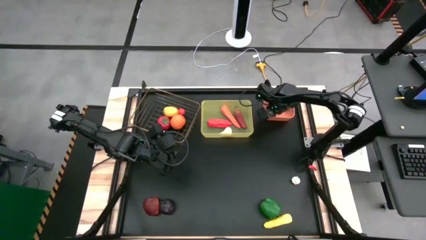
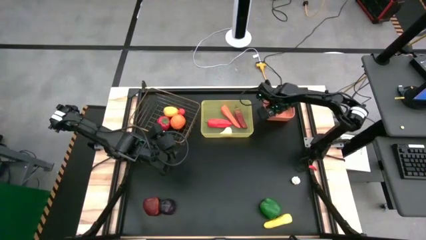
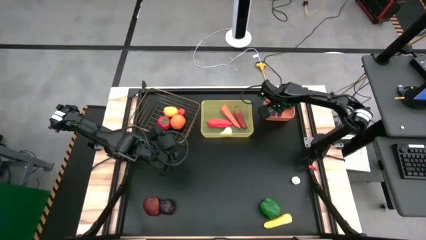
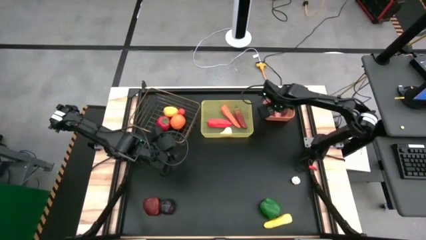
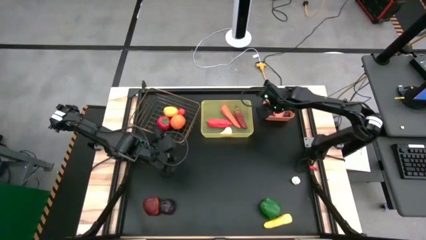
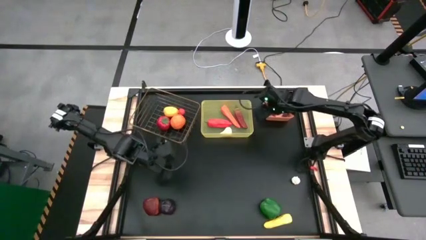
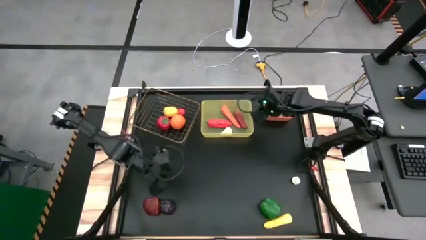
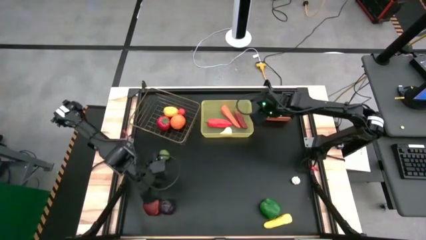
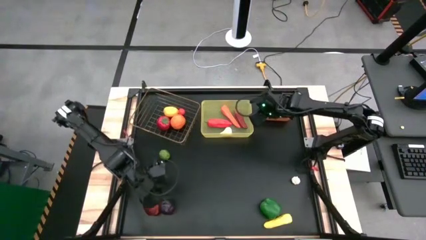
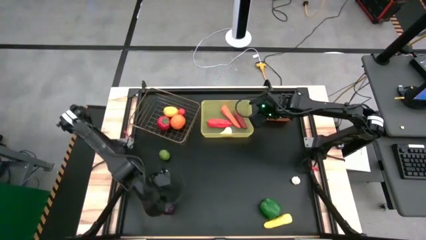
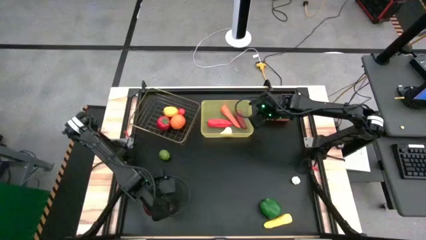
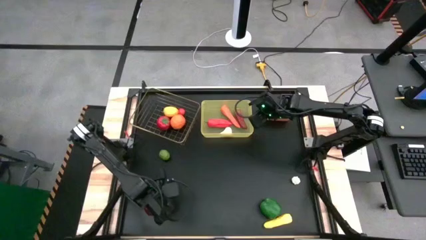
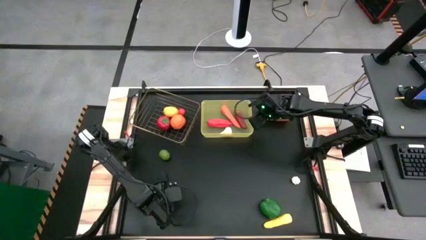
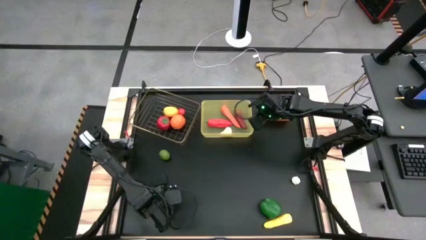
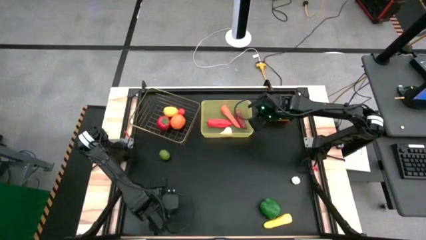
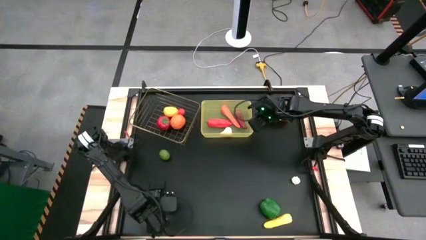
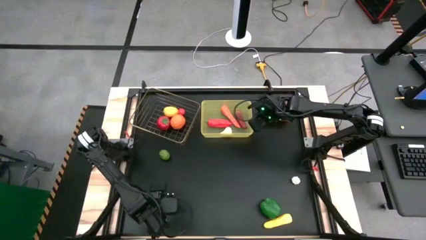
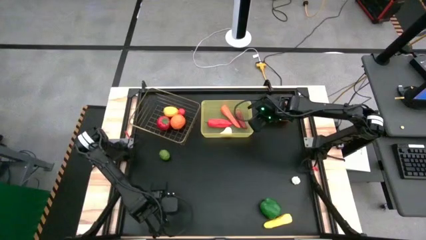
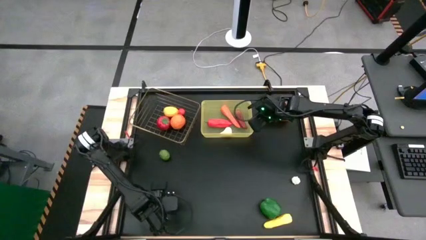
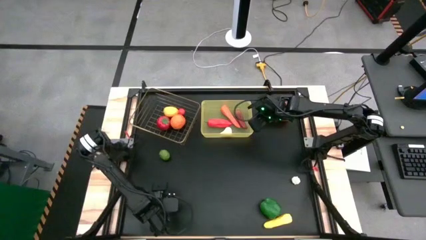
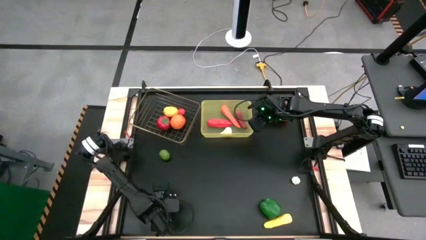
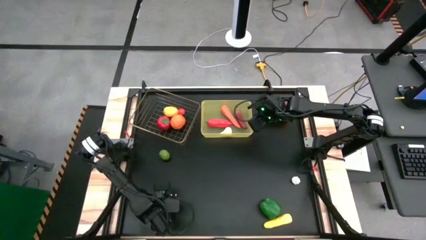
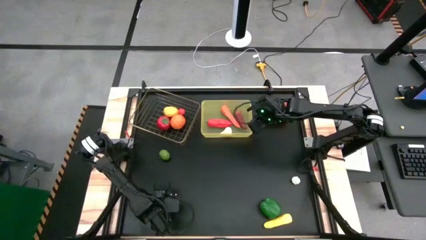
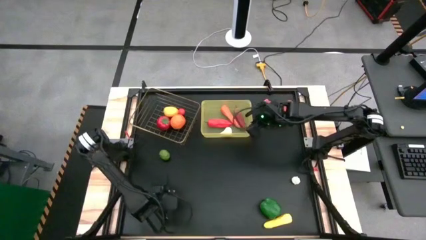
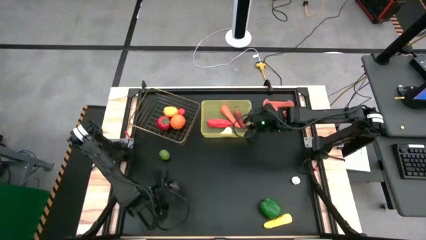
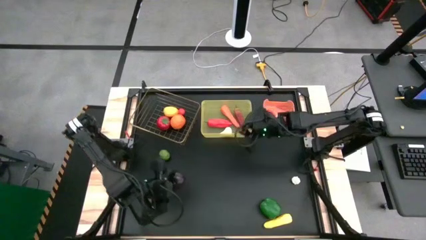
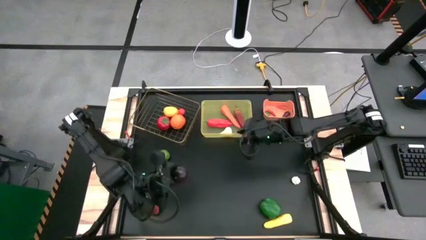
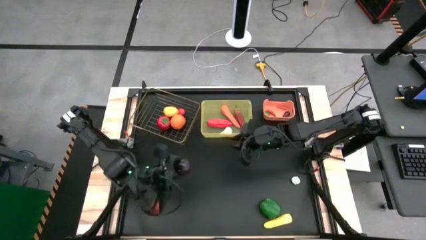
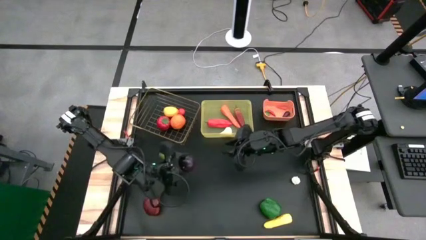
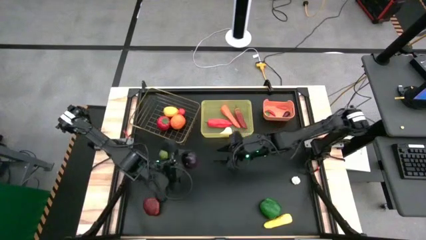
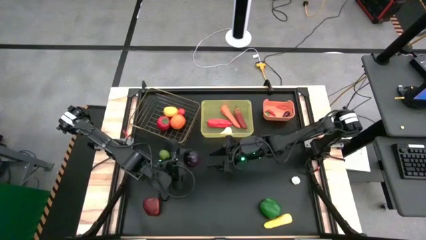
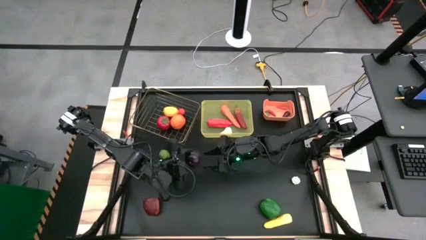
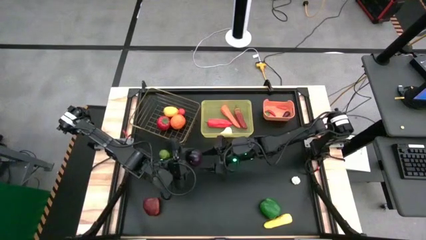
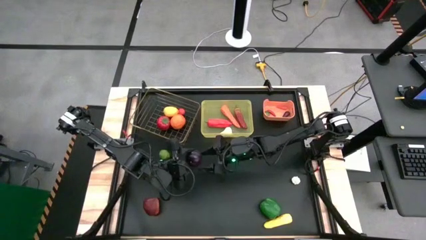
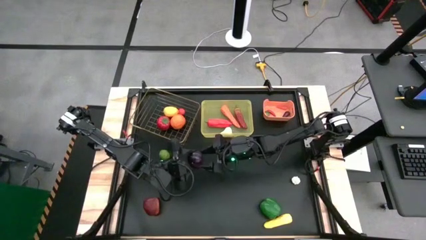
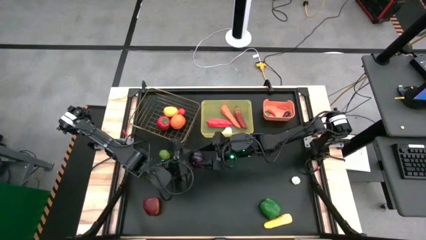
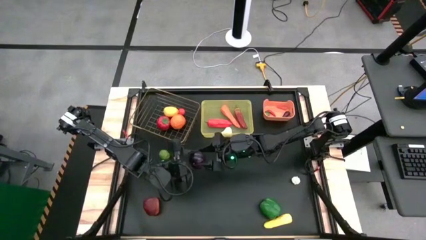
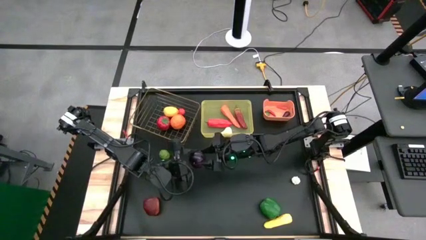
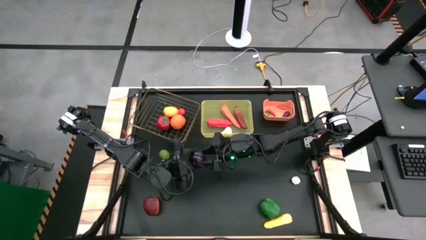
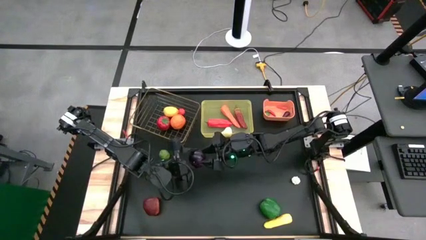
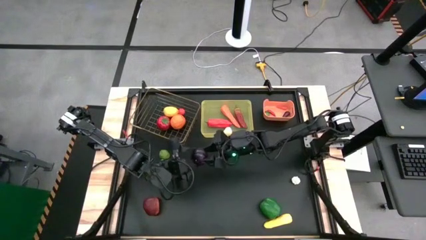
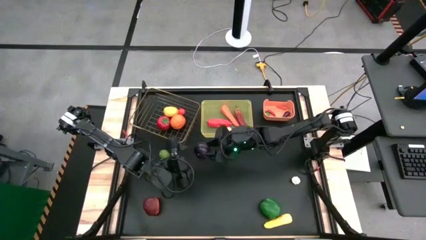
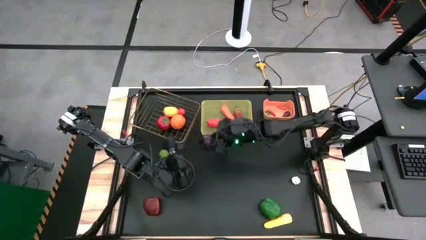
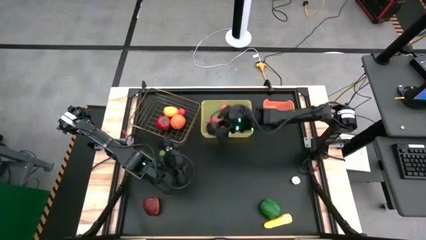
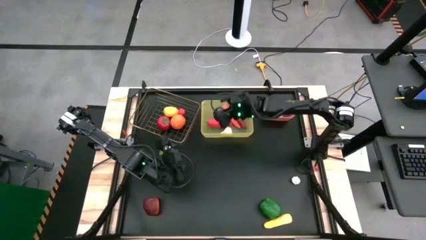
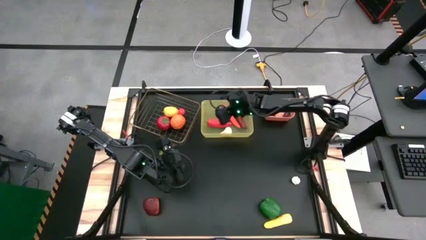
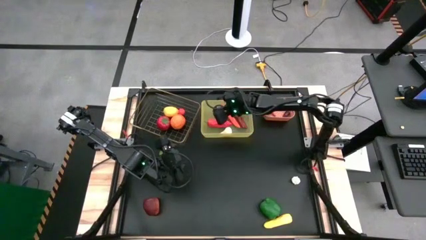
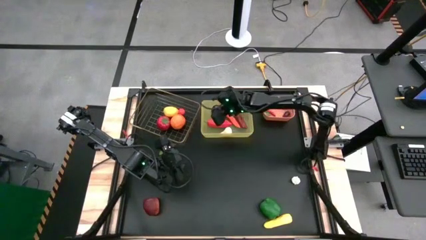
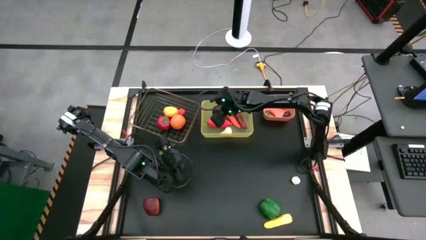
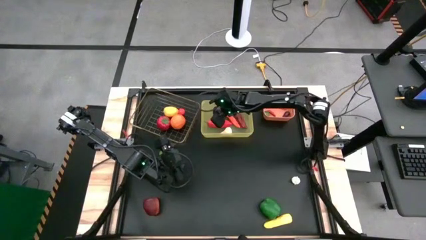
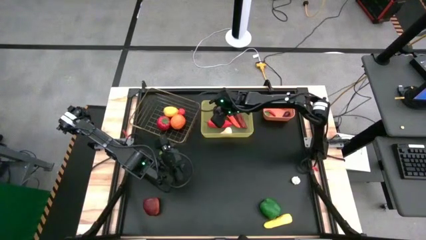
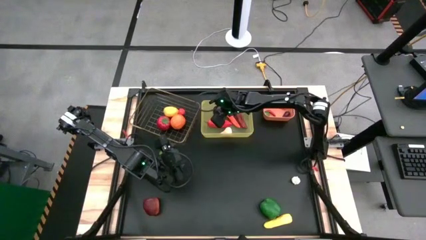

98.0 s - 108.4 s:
Task: Sort produce into baskets
Put the plum into the yellow bin

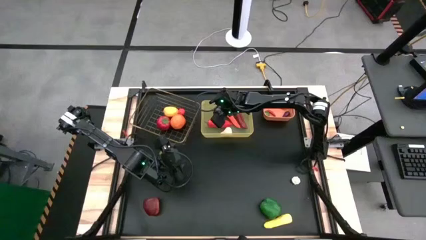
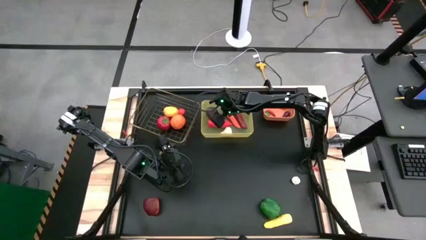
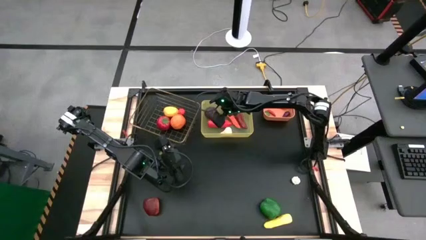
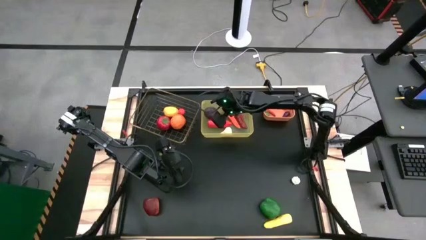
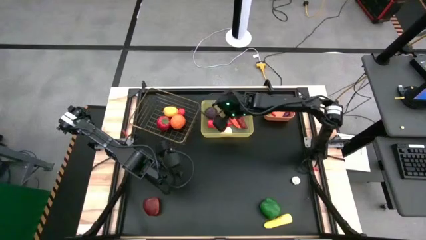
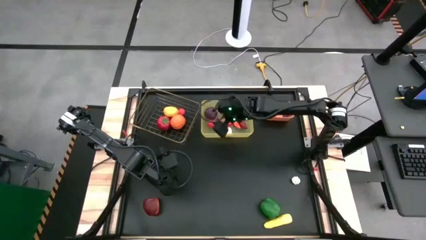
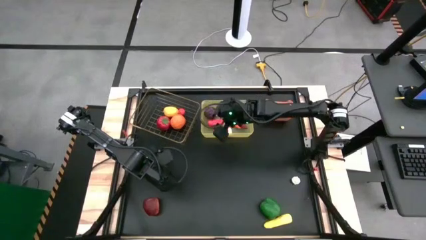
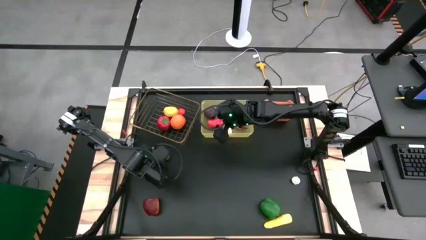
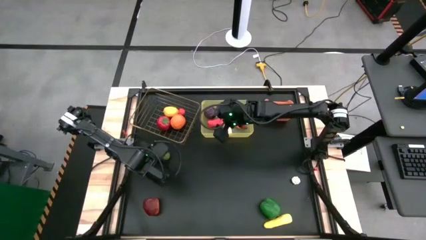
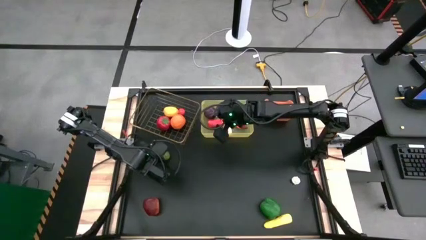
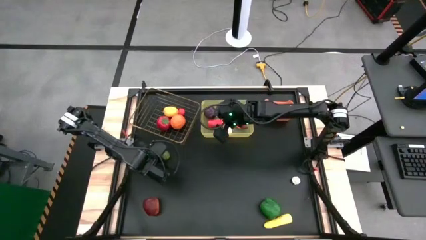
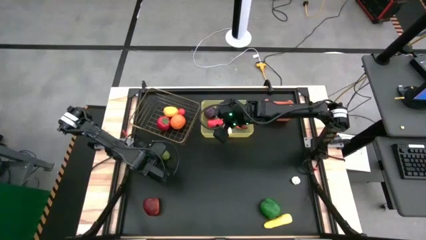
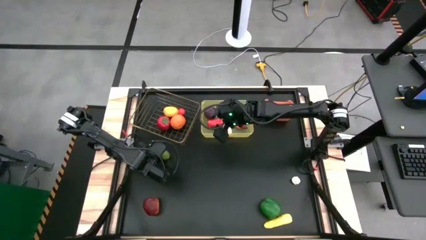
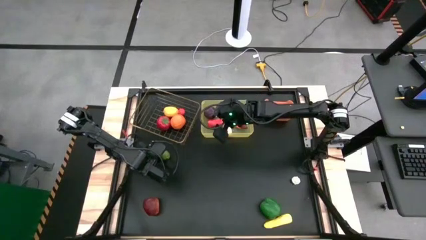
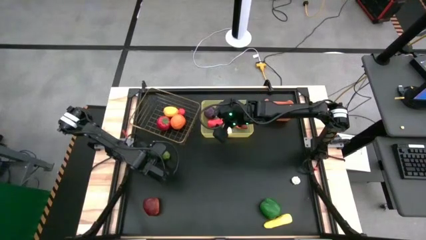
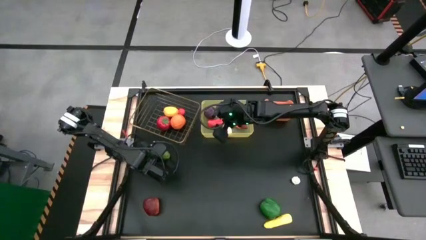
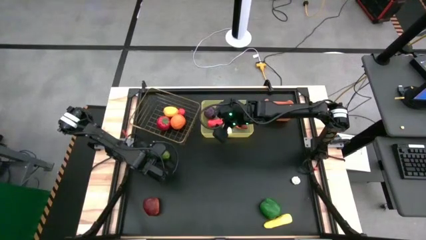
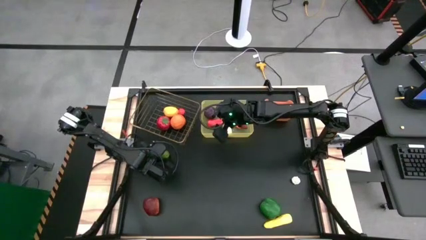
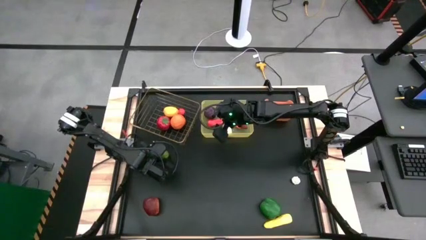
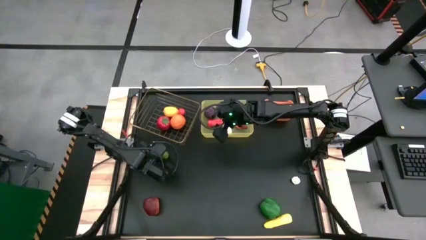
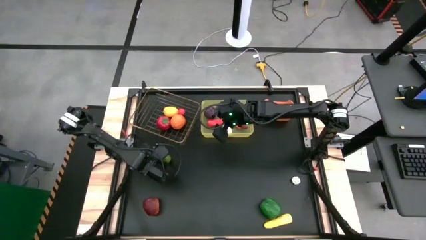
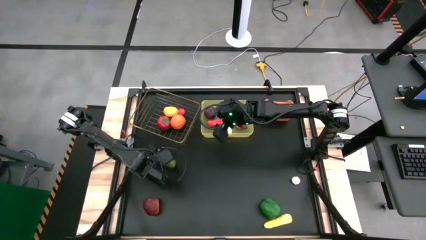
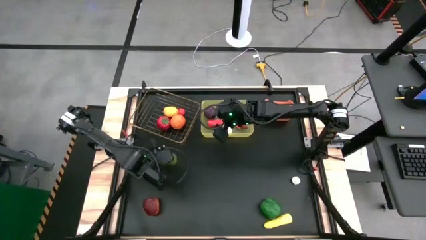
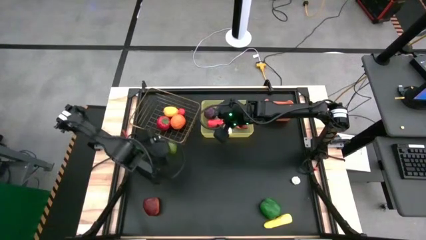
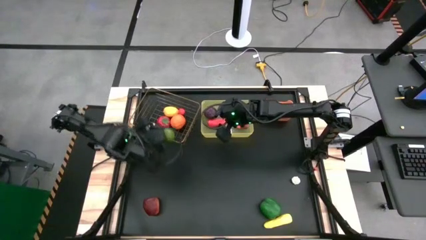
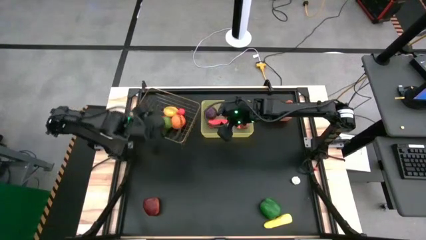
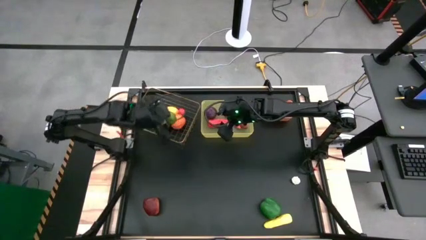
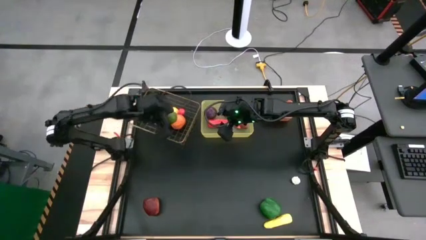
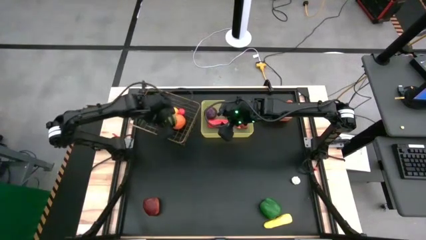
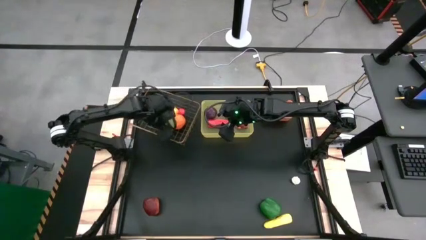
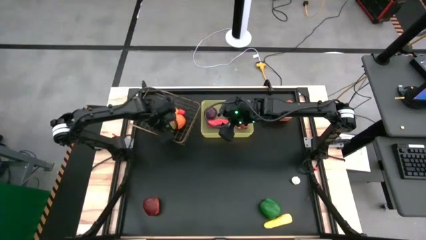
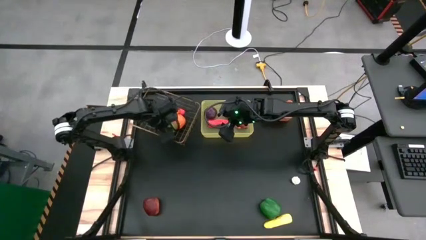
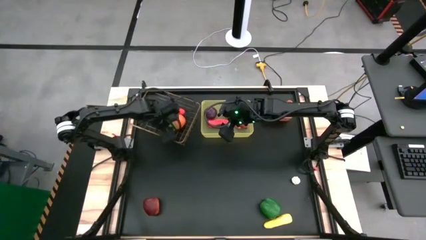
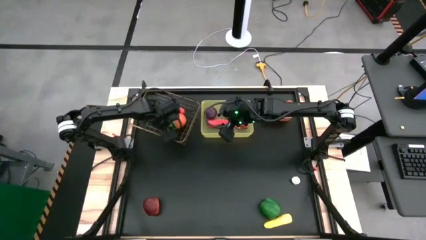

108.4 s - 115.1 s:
Put the lime into the wire bin
